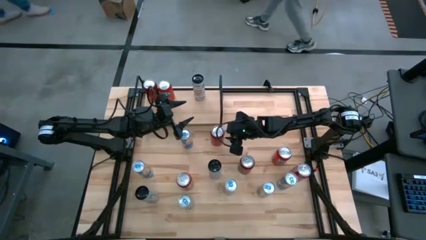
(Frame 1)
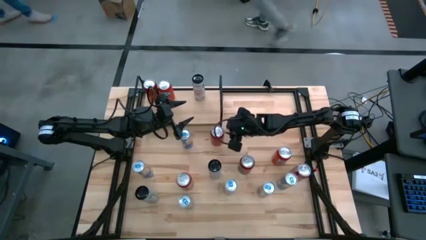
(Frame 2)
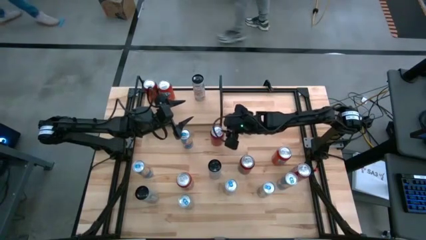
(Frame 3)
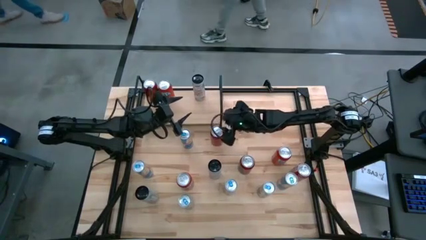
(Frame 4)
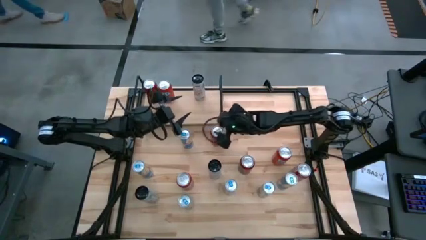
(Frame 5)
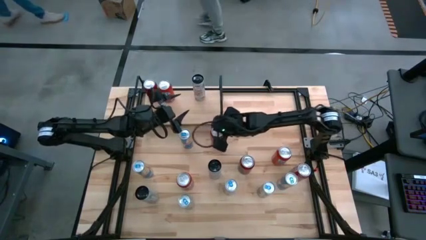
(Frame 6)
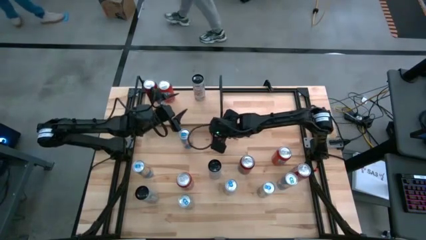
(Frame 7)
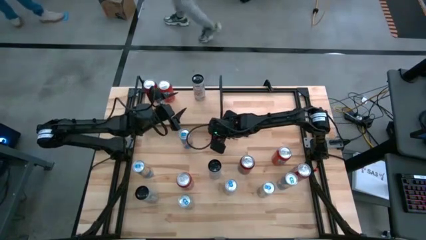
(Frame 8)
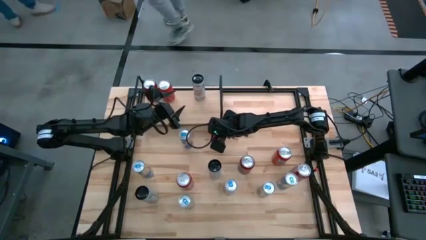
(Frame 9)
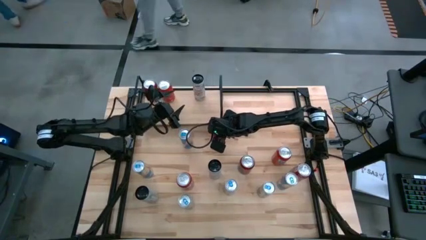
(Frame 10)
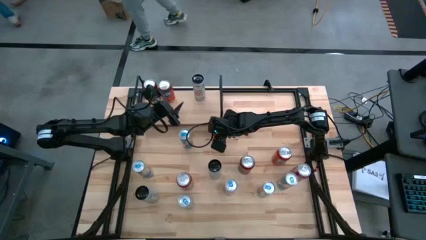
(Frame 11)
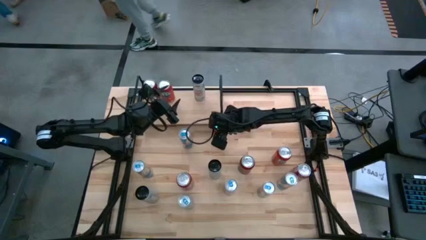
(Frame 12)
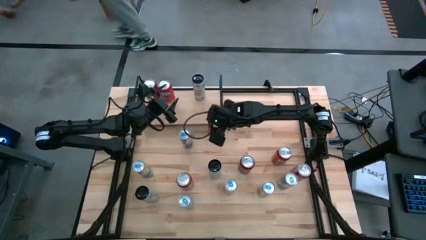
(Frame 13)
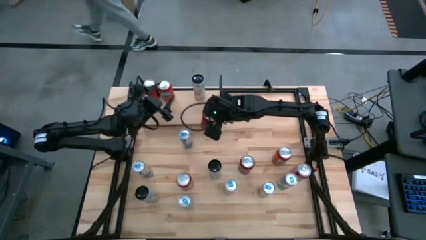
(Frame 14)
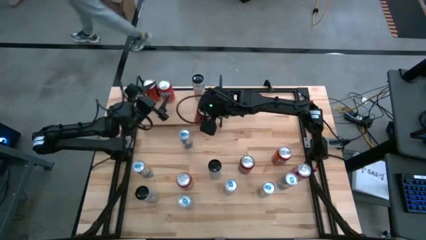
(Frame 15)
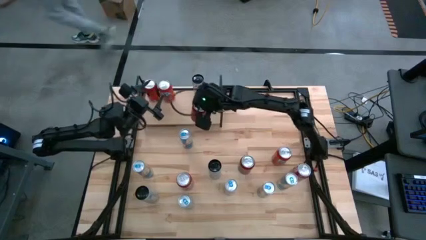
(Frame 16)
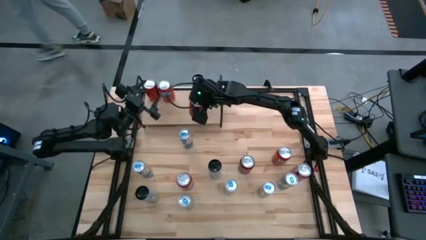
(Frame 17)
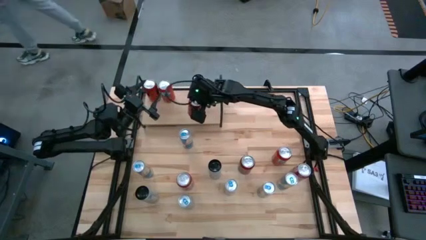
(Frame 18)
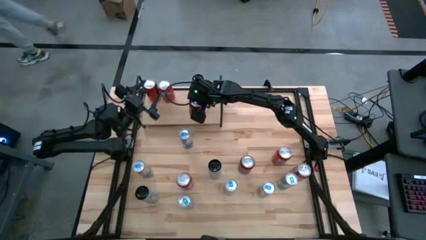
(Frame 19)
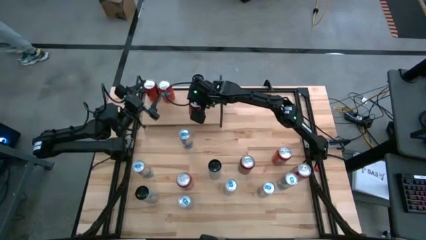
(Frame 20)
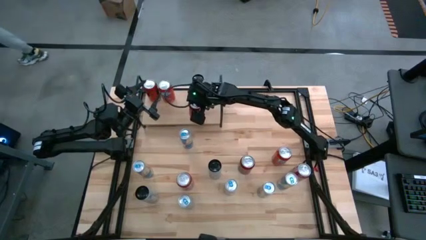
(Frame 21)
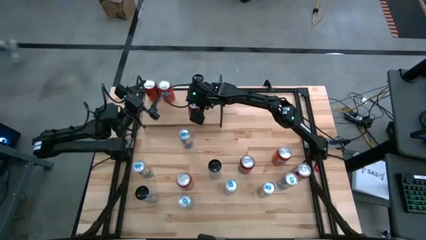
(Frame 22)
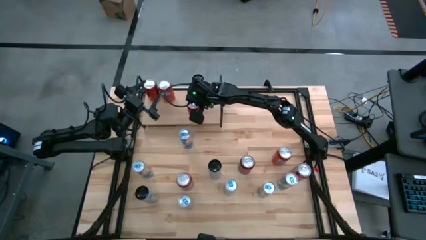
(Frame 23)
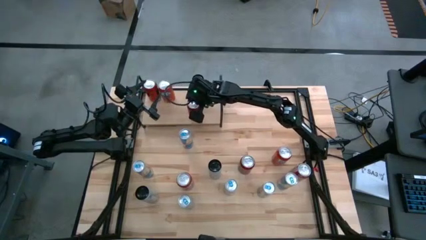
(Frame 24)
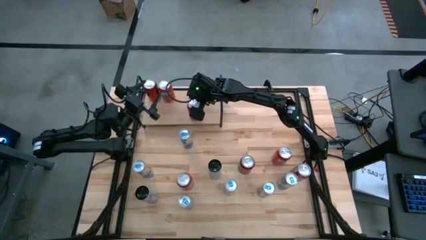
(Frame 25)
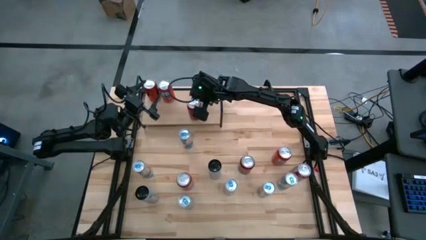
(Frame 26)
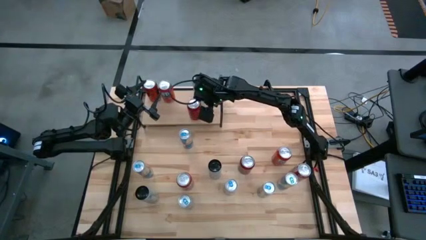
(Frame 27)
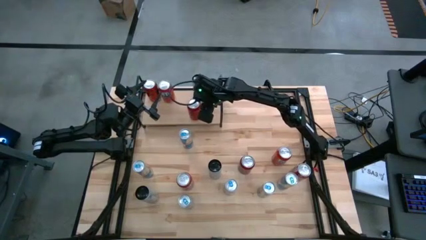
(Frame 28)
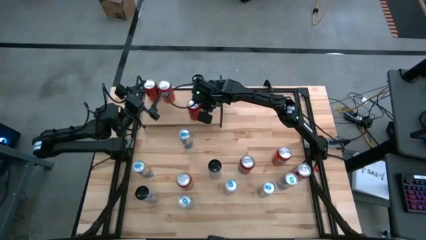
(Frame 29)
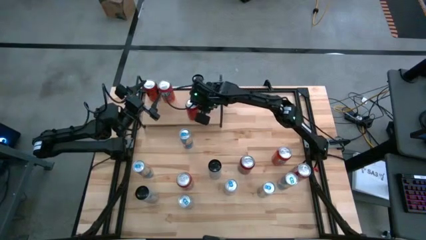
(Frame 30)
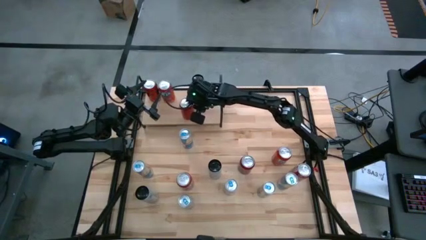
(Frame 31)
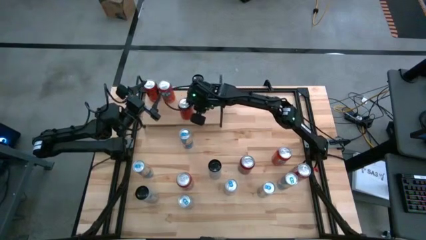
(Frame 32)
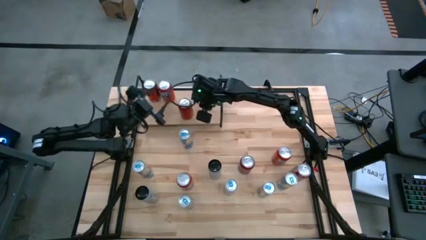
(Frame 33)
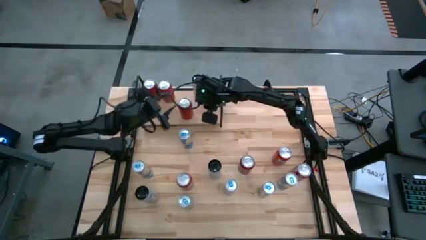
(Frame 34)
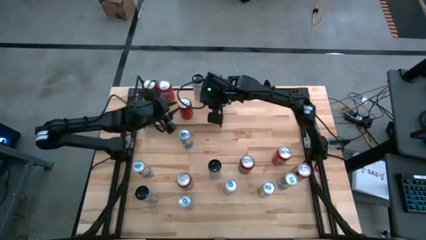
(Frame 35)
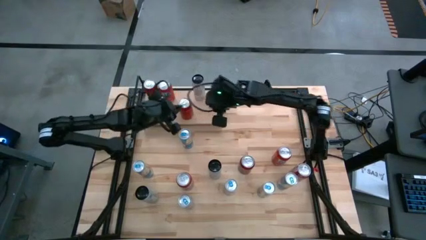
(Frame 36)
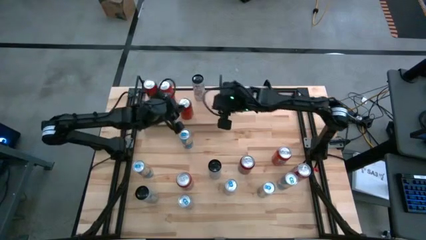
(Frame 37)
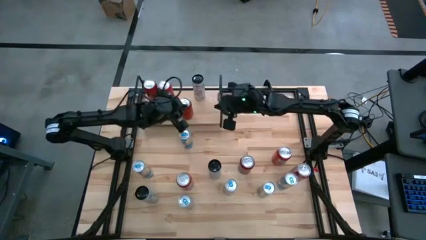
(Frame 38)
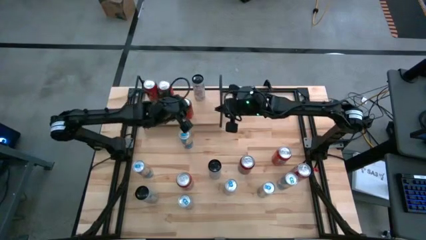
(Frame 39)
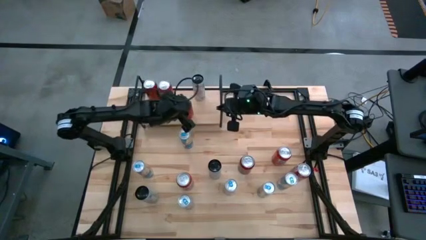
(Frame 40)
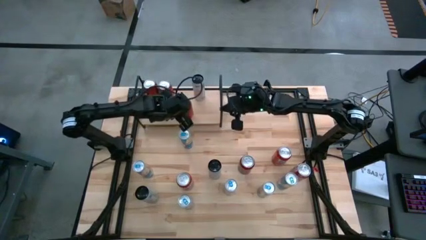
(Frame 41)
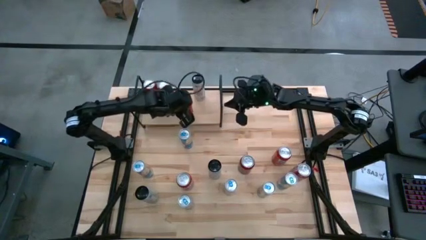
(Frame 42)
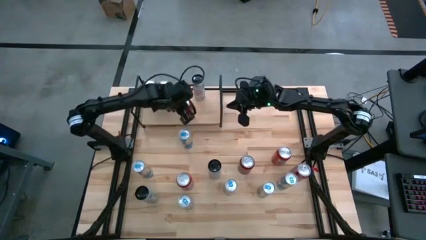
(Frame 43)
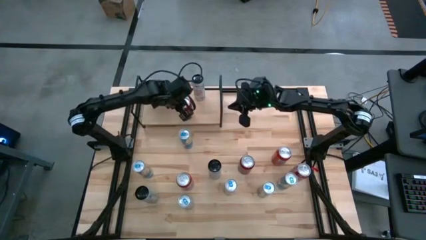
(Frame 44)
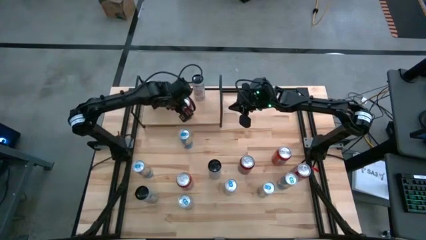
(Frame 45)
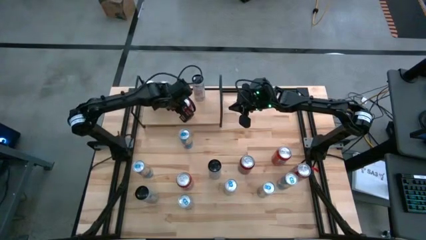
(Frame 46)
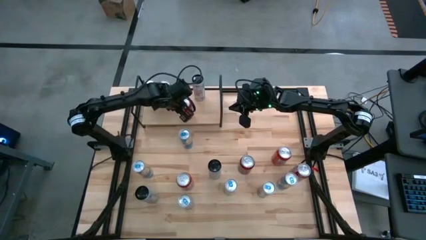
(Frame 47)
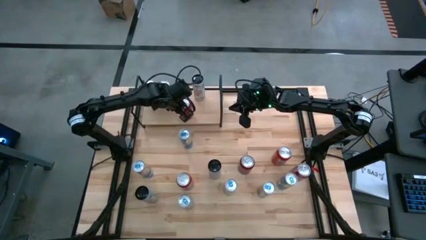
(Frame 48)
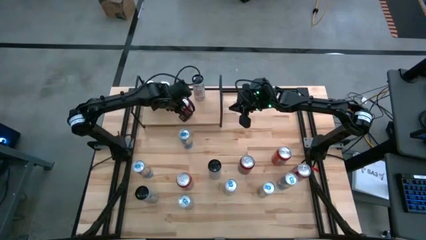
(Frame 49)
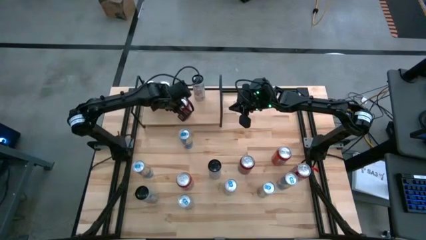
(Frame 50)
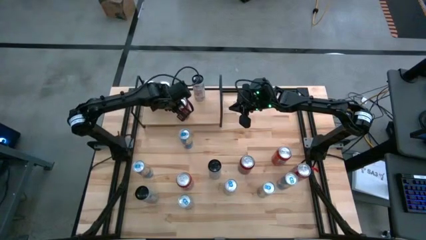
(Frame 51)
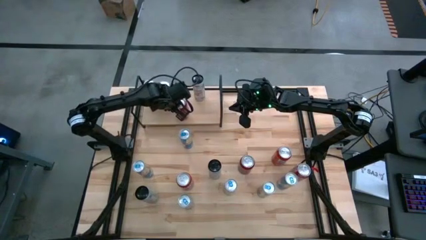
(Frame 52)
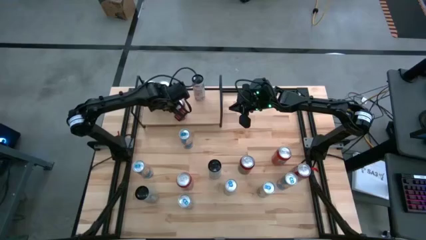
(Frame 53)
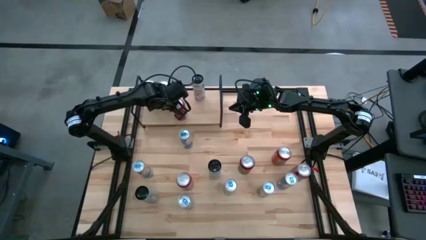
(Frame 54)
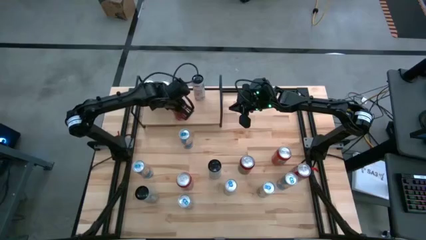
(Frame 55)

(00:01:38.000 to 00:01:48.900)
Task: Place canned beverage on shelf
Put the red and black soda can on the shelf aligned with the other red and black soda can
